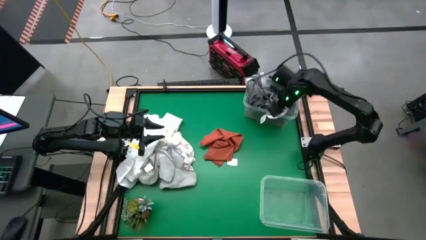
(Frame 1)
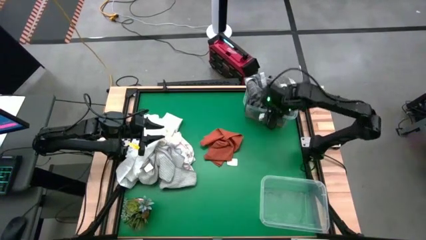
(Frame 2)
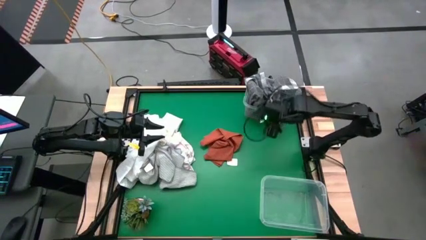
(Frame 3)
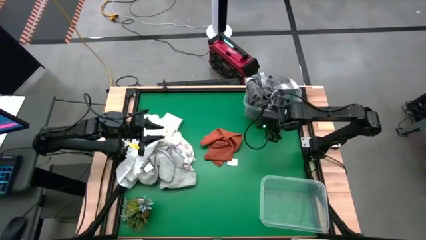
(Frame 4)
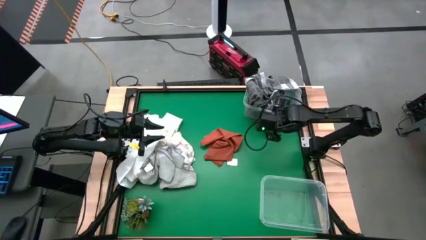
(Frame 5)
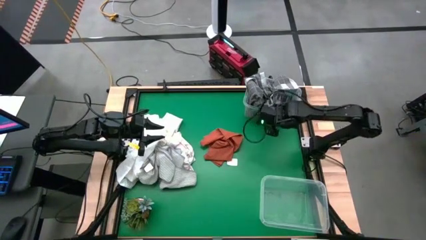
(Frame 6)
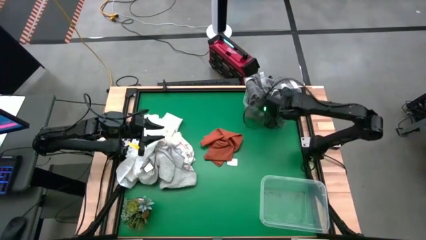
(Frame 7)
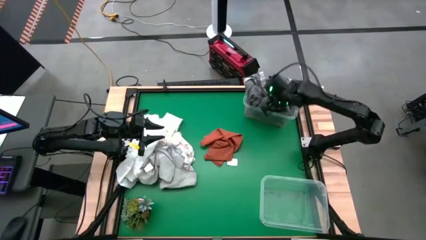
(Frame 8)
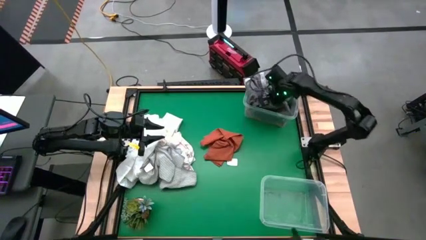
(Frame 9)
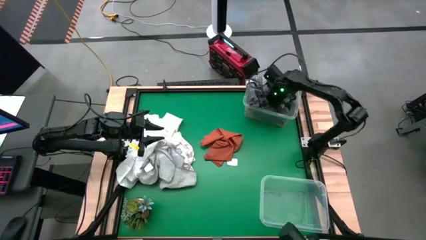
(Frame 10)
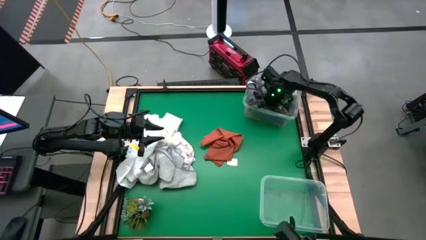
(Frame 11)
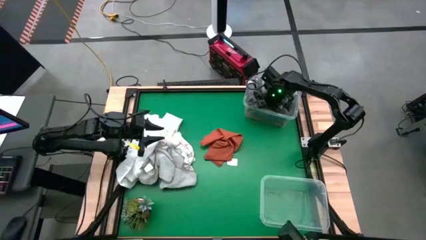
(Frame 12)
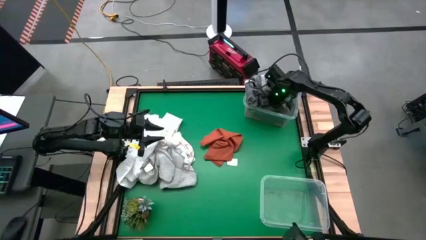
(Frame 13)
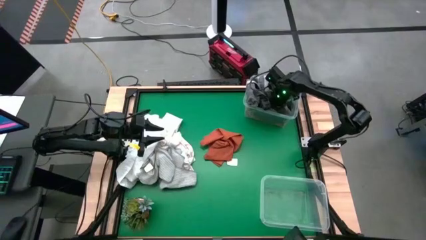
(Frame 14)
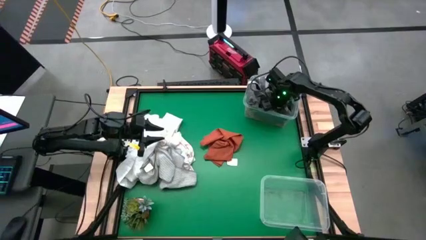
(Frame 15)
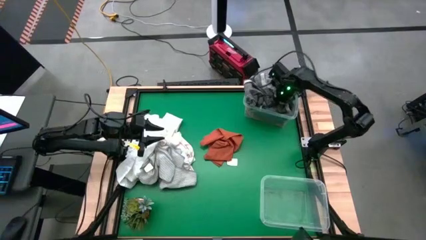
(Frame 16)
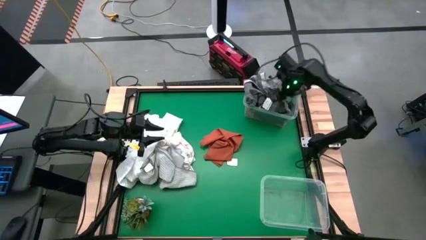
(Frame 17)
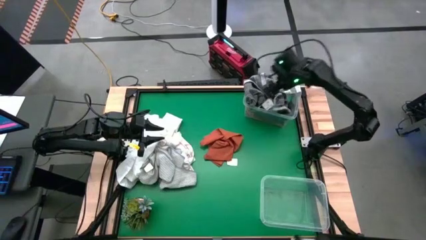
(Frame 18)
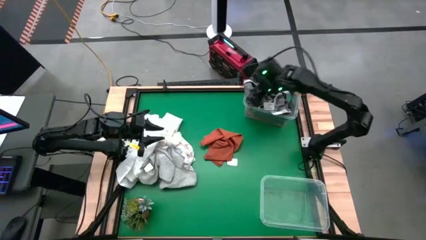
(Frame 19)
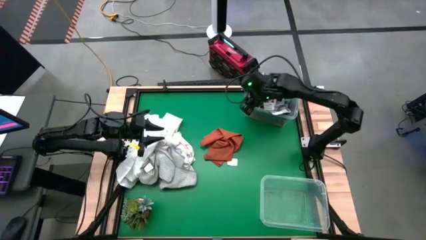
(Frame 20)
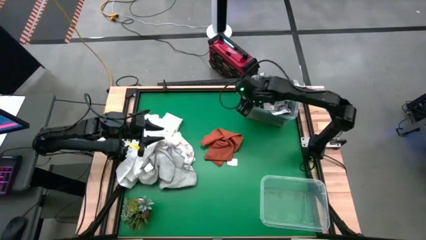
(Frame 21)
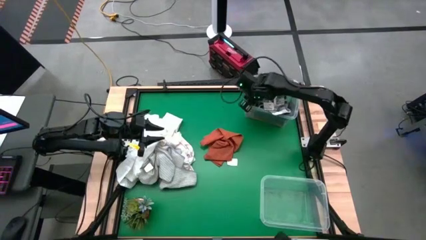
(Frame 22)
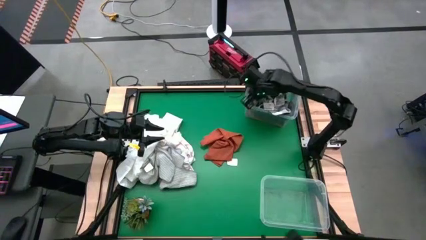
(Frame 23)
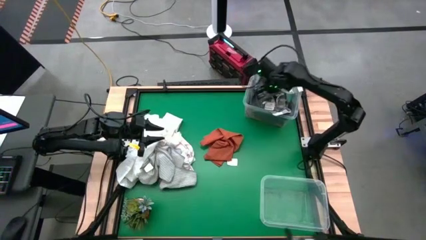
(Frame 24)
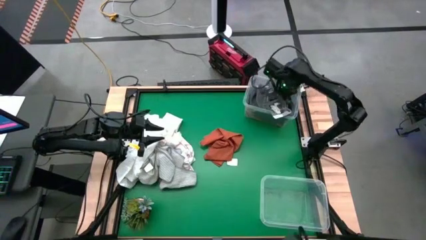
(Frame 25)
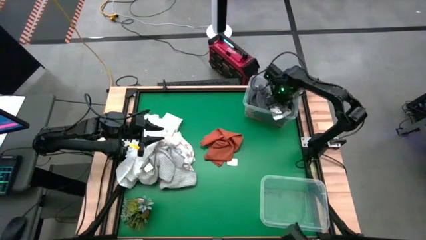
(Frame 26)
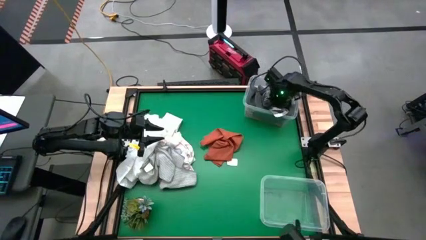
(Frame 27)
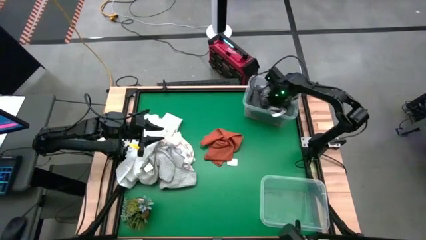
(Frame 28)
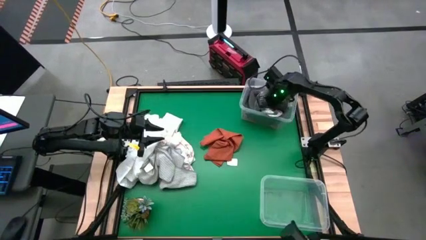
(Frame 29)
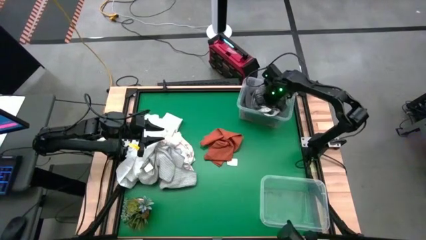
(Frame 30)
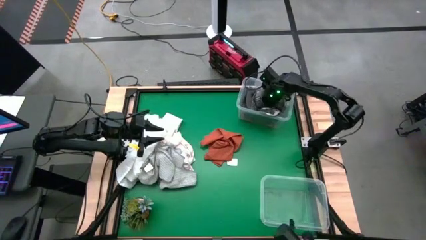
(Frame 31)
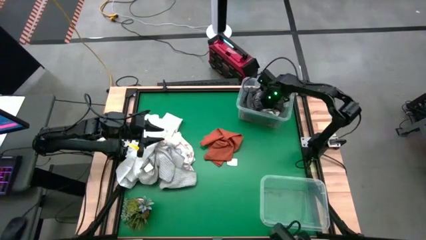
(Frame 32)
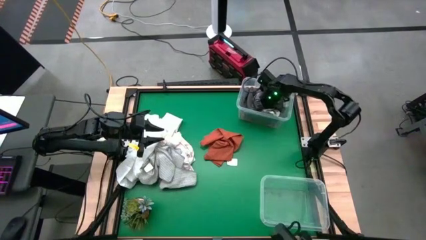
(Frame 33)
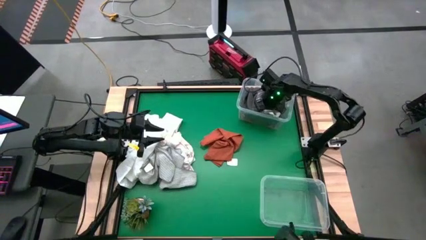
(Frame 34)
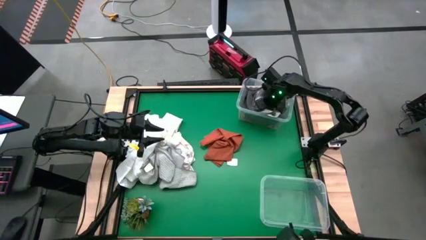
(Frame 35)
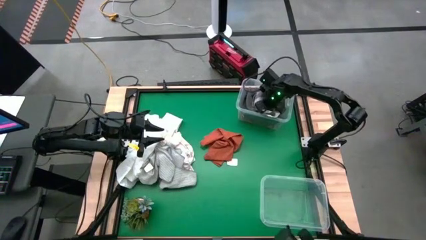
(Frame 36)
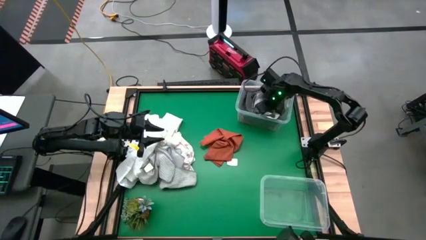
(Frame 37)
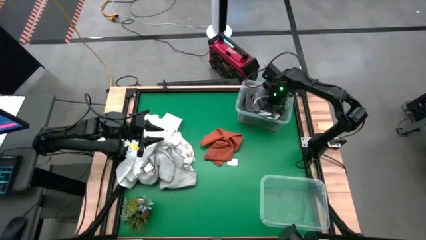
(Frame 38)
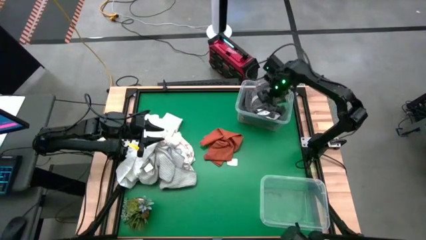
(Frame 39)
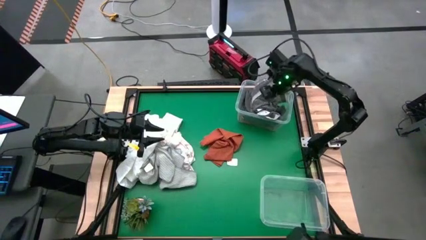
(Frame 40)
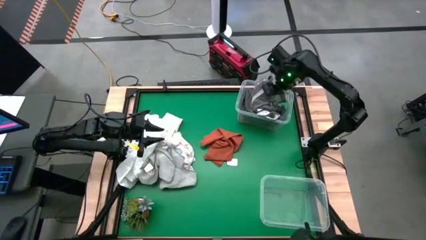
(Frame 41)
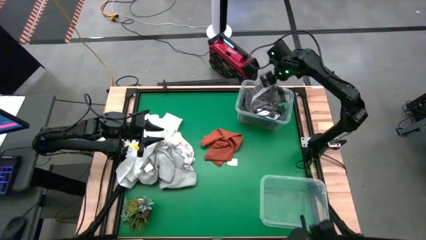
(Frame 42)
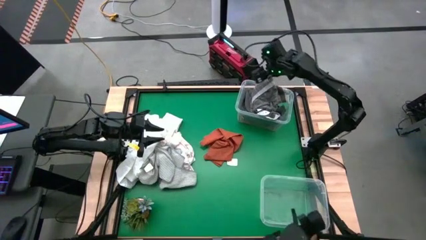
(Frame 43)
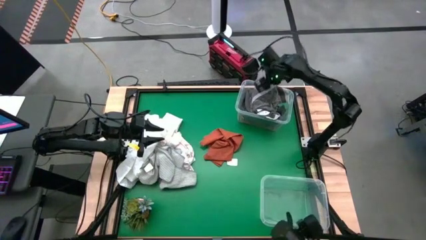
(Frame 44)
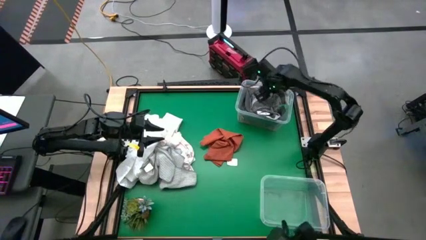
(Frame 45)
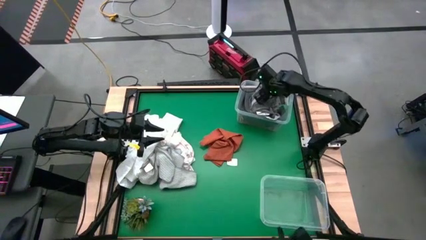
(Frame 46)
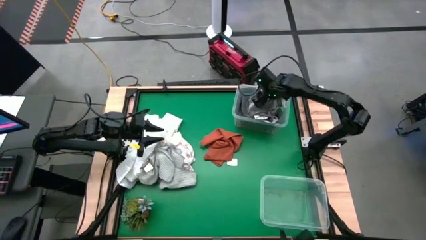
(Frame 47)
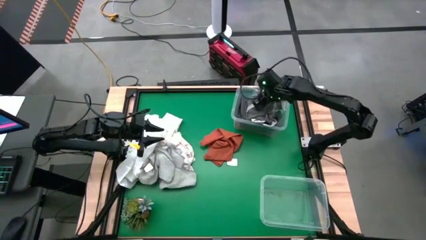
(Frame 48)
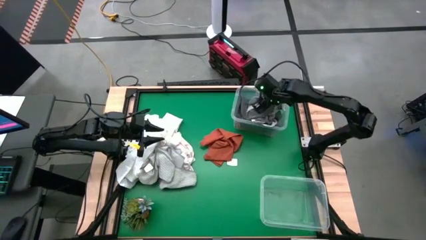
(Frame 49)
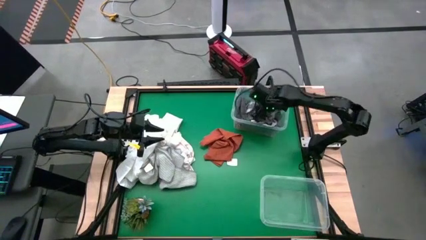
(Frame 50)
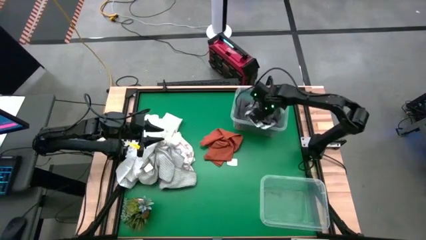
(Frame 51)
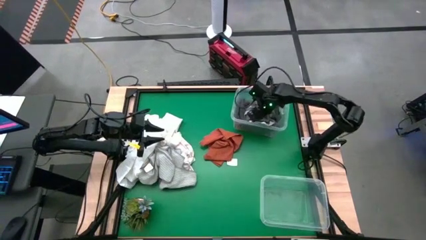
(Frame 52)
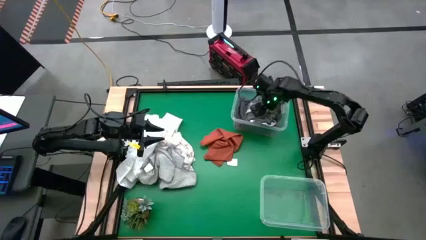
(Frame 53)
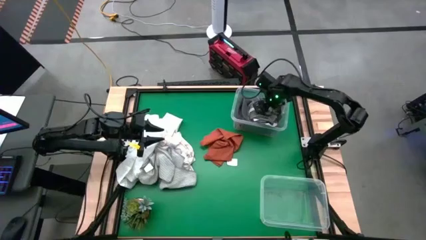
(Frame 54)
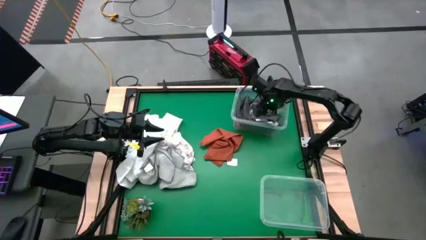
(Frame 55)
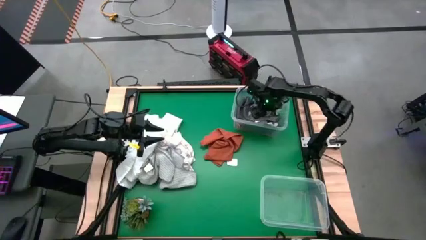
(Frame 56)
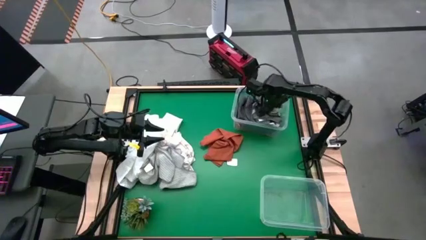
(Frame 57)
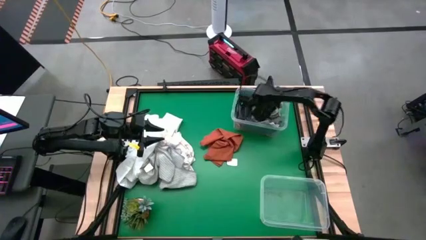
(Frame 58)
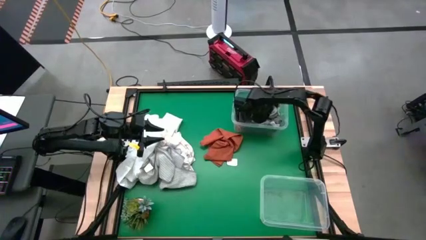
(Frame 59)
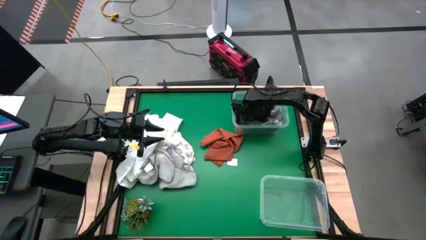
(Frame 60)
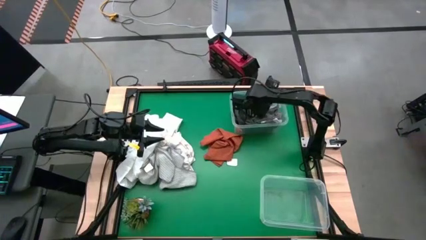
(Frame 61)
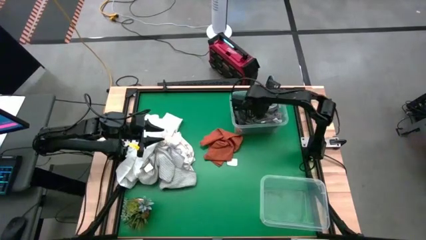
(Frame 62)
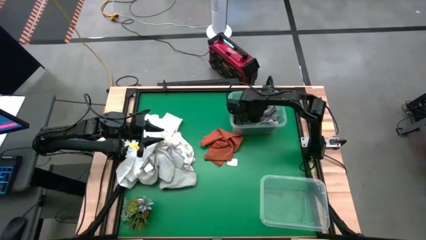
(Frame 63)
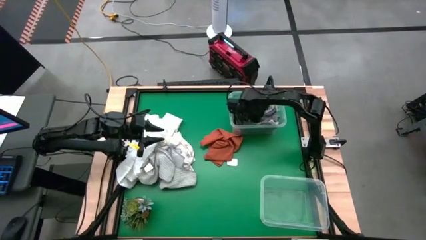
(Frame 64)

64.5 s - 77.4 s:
Task: Sort towels by color in basket
Put the gray patterned towel into the top transparent bin

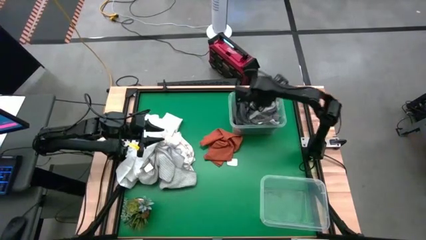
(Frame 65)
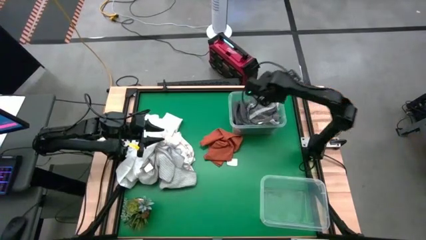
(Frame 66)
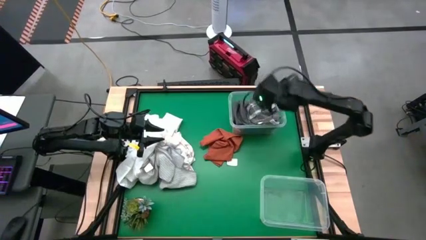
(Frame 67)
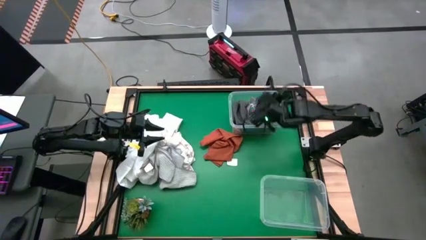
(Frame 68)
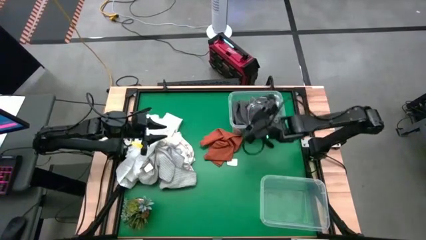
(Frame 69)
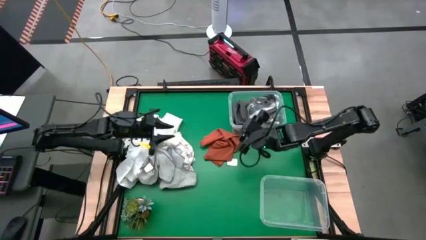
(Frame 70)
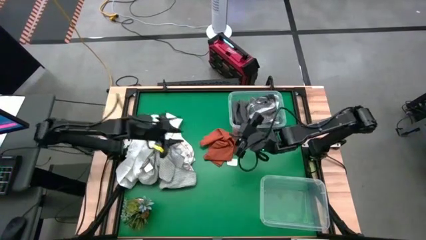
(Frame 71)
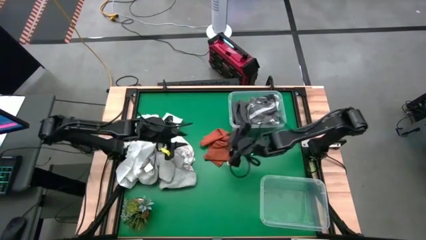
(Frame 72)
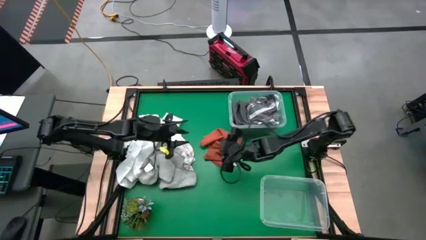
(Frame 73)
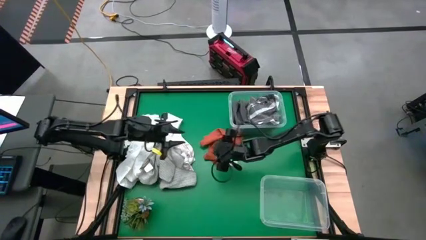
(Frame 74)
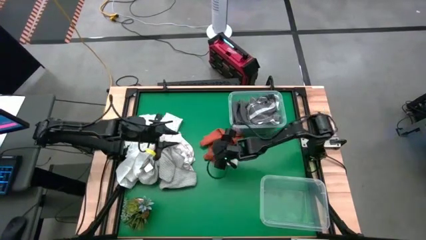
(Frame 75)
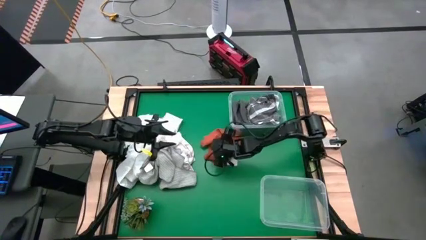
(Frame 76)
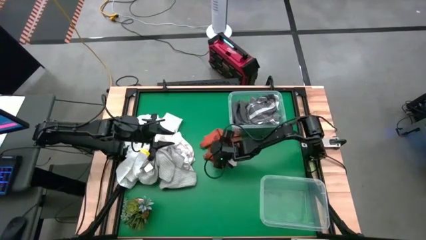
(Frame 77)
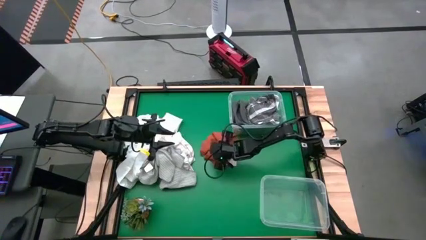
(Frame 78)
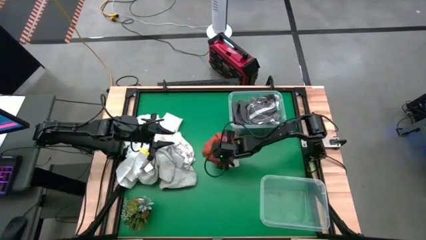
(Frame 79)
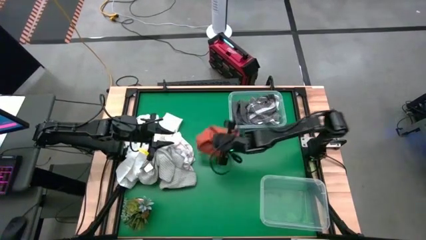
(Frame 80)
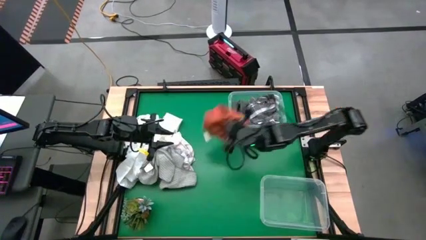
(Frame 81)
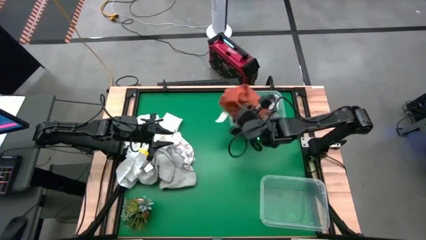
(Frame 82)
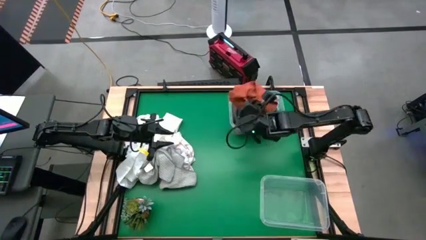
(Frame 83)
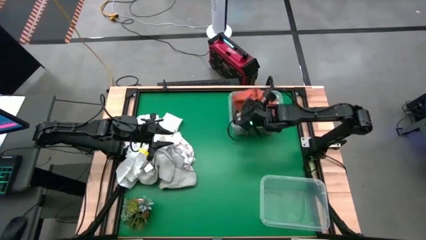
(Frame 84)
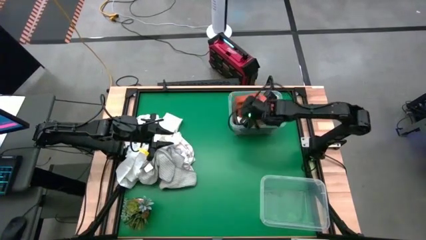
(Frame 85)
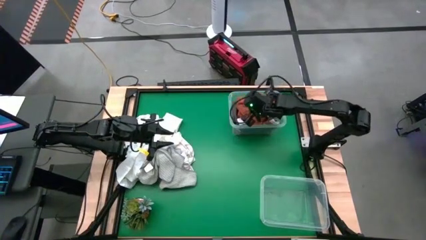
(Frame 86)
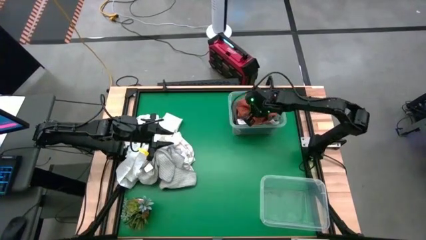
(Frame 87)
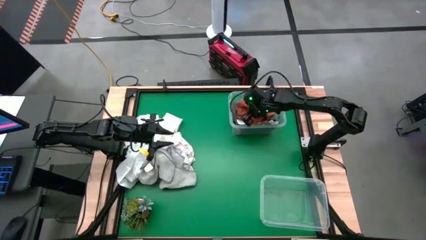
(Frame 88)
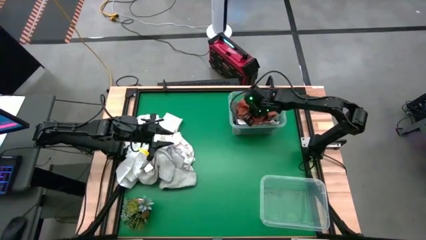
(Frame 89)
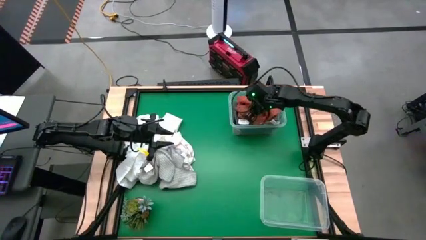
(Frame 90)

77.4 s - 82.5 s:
Put the orange towel into the top transparent bin
